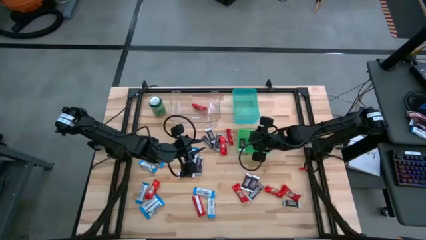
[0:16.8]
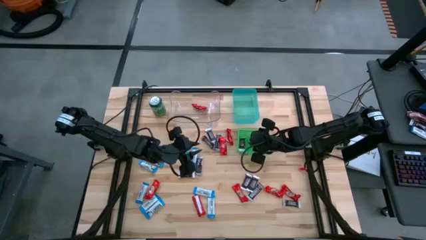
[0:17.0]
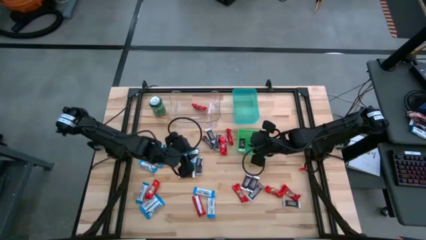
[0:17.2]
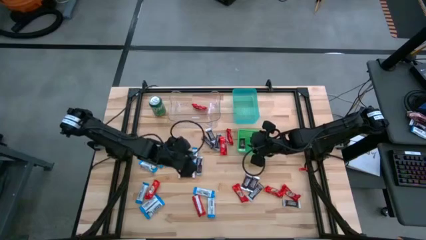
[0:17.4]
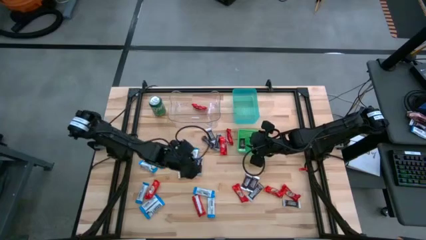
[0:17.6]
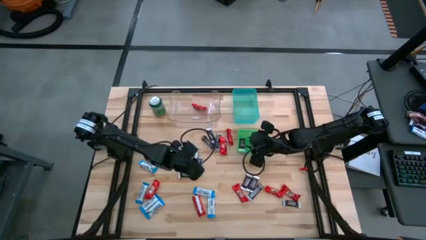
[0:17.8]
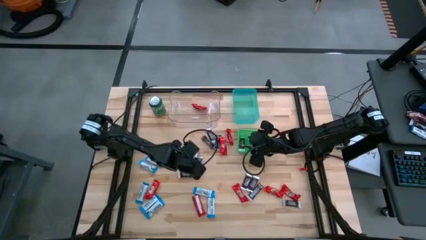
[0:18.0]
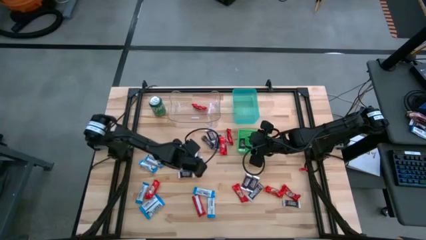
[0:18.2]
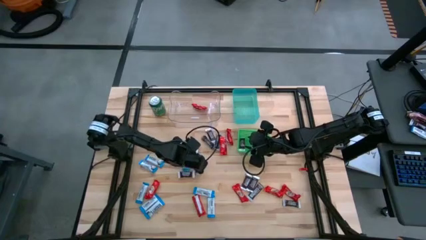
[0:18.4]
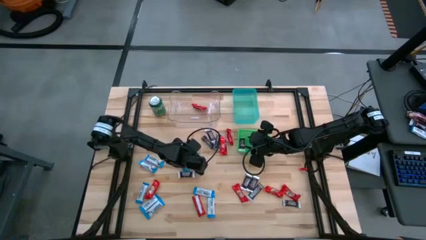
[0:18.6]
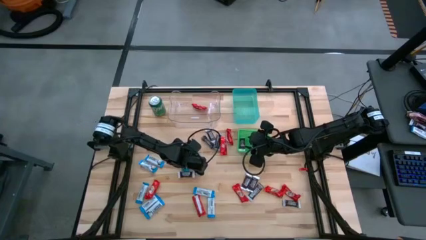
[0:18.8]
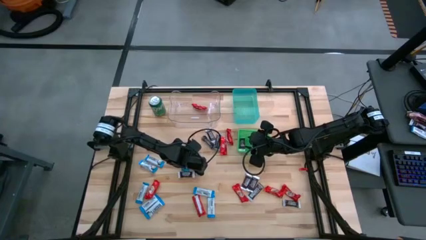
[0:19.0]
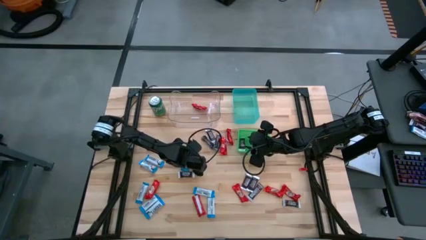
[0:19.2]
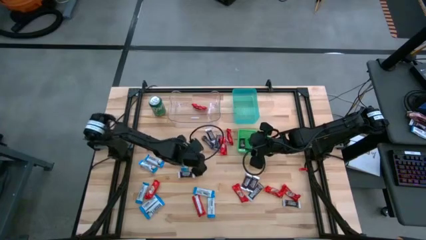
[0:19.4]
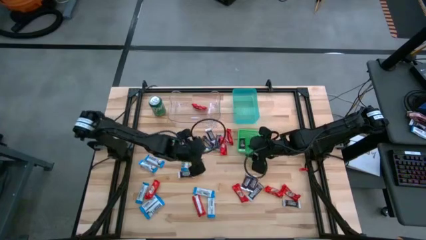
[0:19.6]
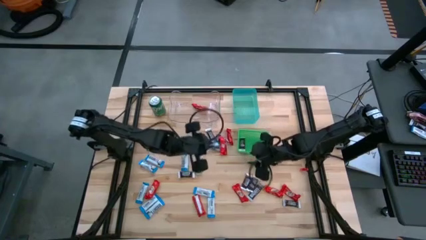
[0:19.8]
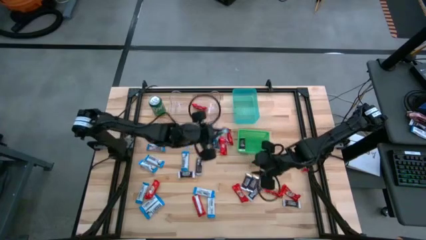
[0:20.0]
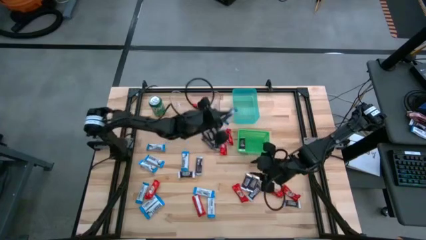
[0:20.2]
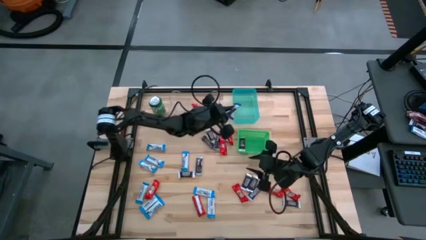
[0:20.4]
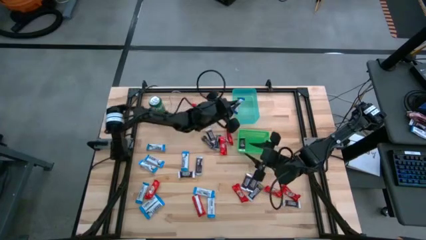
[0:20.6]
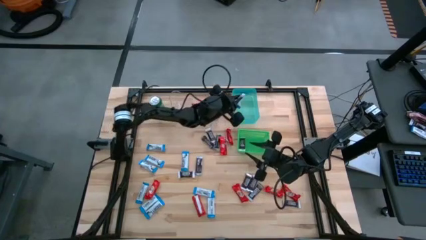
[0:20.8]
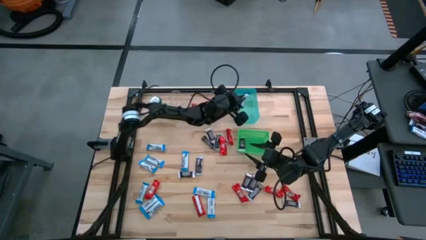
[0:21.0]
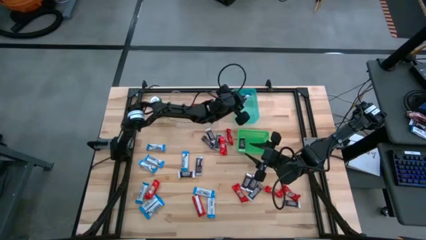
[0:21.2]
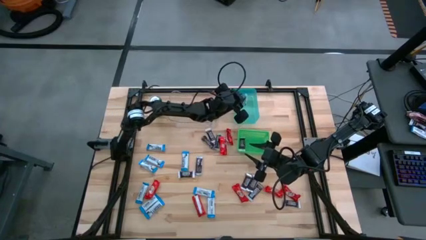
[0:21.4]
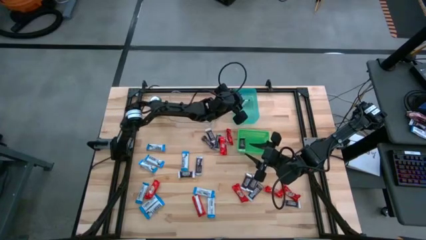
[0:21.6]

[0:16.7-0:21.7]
Task: Sort candy
Put the white chocolate bar into the blue bin

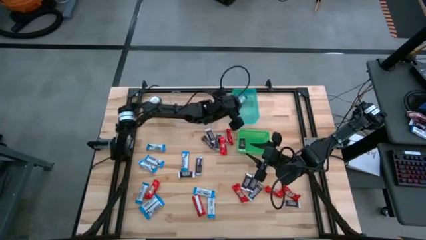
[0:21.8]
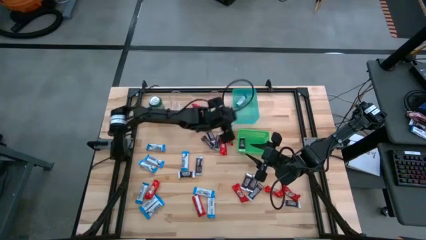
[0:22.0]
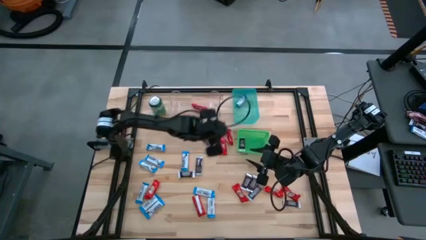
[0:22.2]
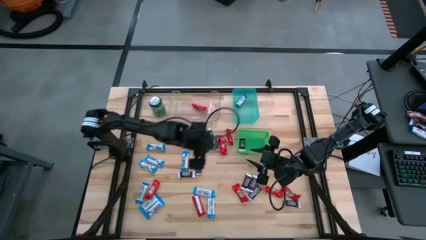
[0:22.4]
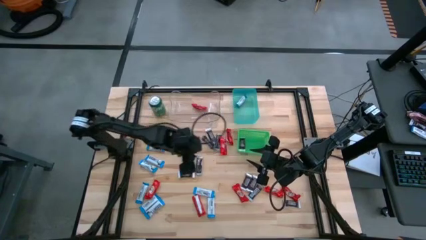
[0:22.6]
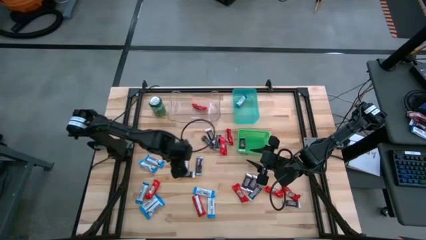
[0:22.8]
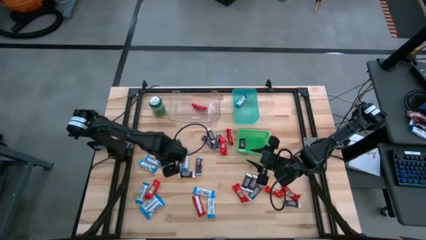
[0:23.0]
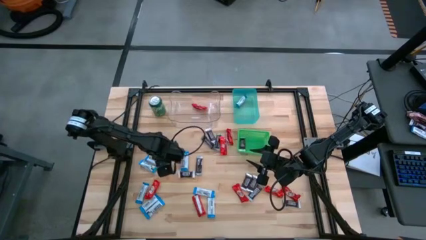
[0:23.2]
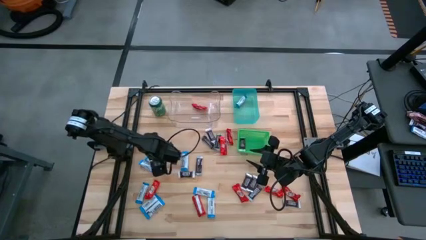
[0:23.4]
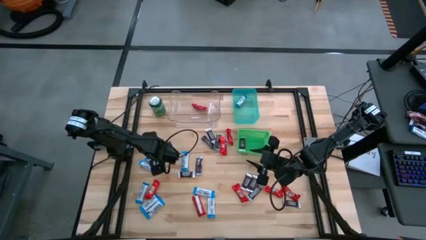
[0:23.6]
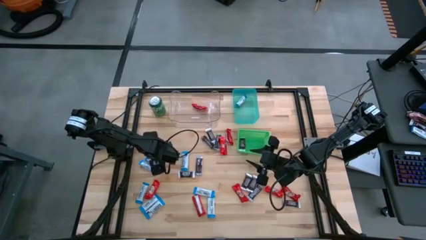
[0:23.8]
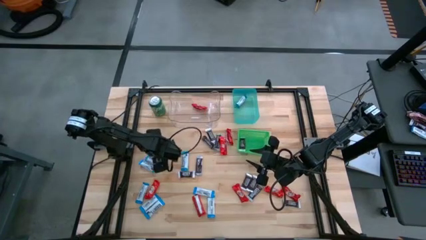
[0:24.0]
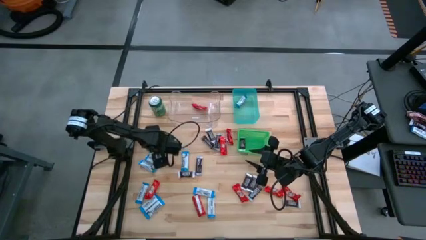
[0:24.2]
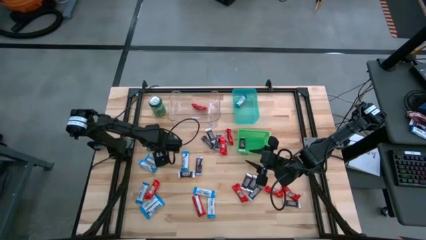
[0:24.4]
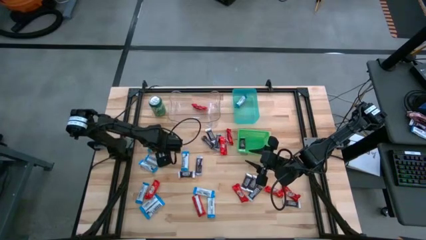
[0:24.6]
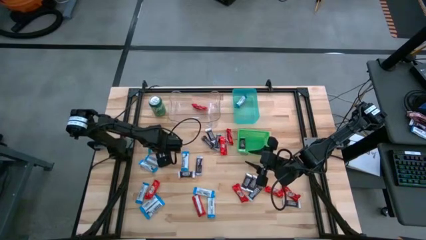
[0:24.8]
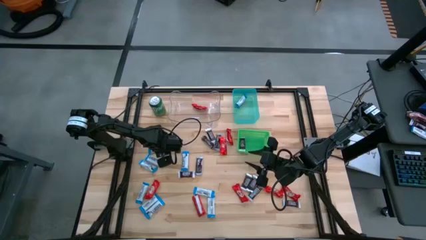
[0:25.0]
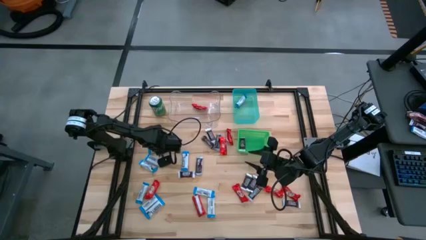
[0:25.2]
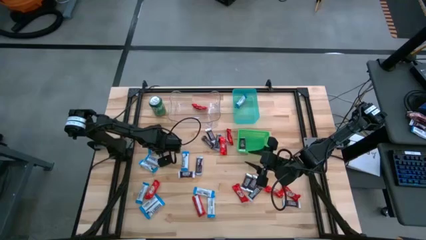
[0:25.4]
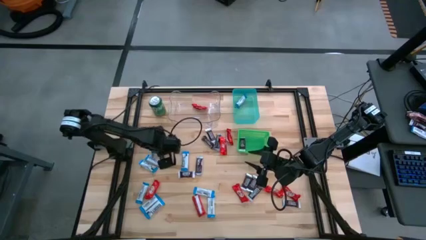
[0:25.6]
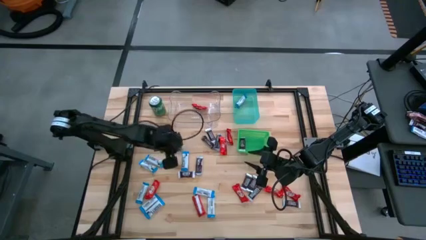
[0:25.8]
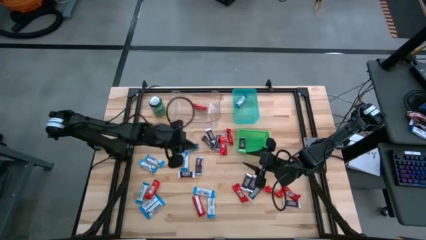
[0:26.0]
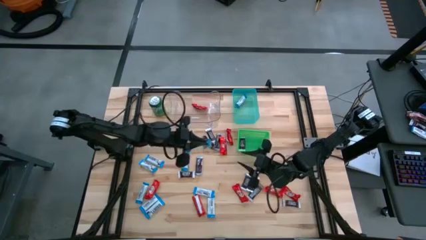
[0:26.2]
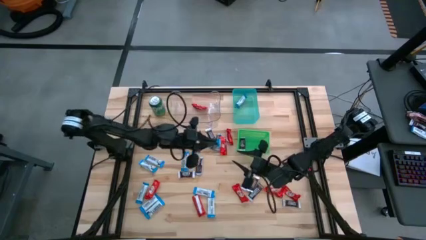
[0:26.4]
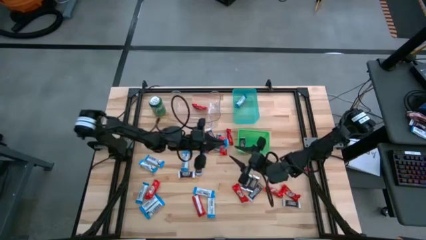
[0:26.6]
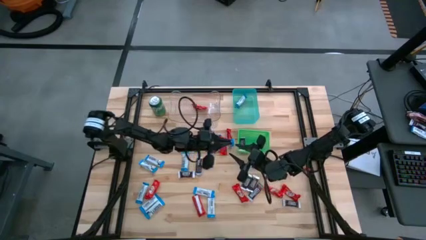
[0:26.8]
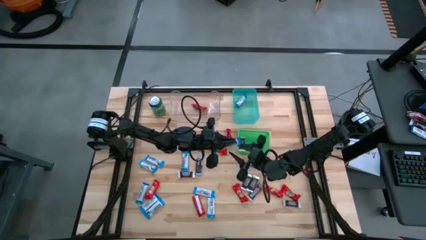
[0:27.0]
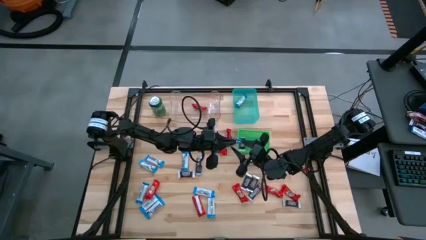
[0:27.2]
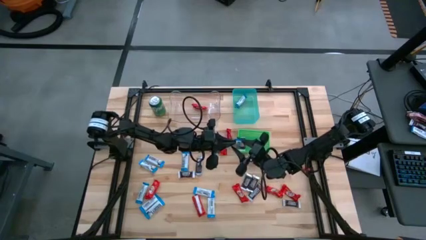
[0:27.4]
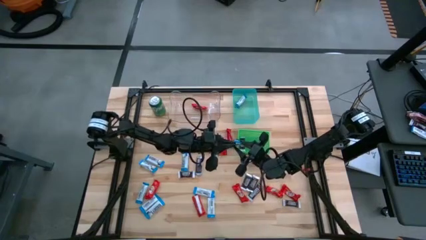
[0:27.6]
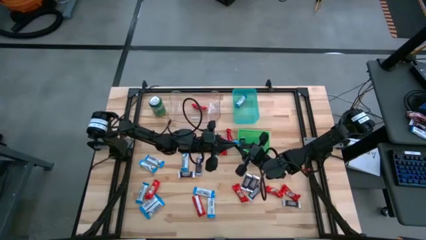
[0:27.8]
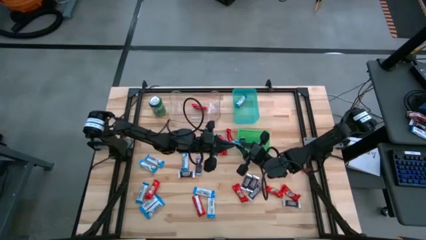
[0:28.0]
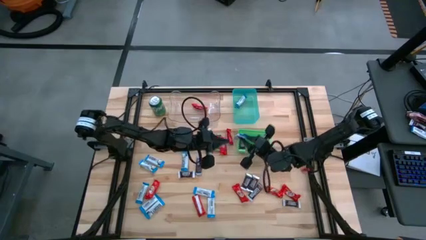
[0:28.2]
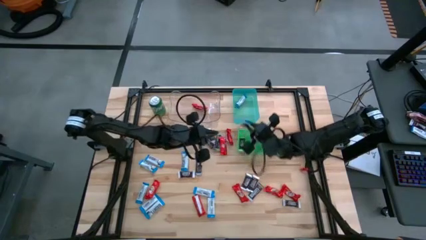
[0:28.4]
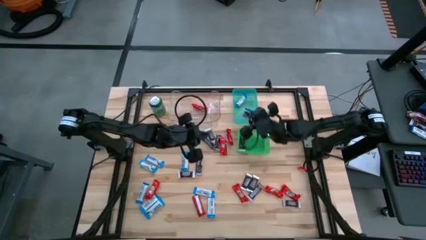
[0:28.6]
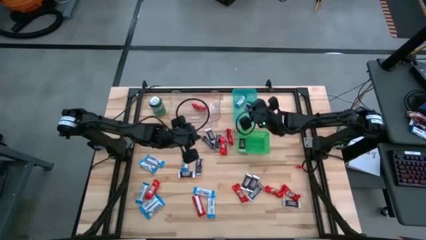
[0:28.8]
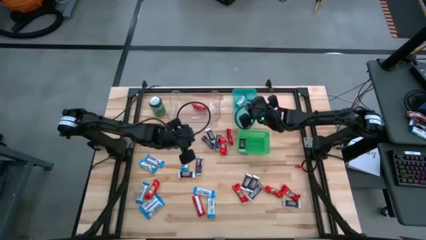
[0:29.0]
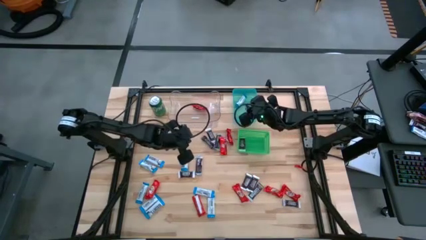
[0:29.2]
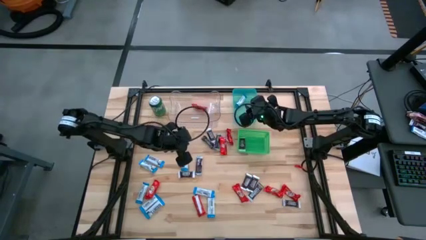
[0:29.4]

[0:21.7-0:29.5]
Put the white chocolate bar into the blue bin

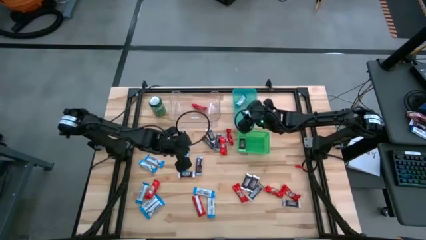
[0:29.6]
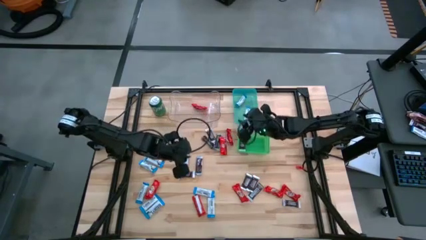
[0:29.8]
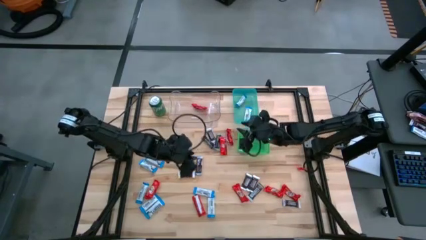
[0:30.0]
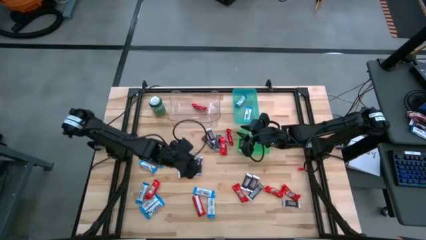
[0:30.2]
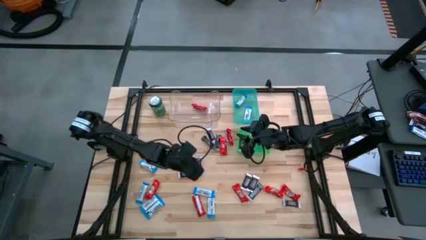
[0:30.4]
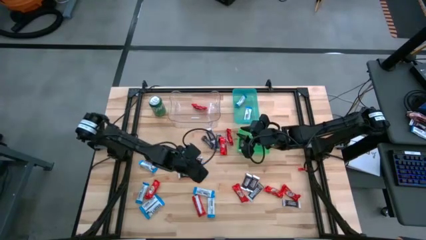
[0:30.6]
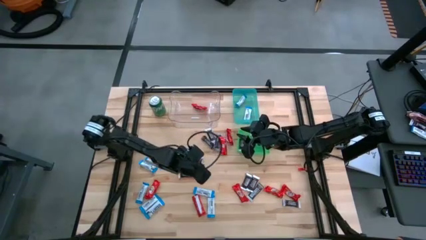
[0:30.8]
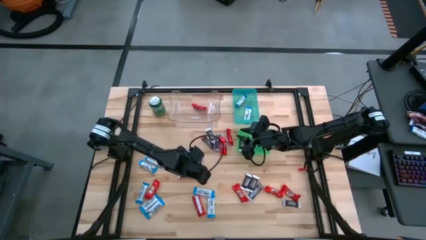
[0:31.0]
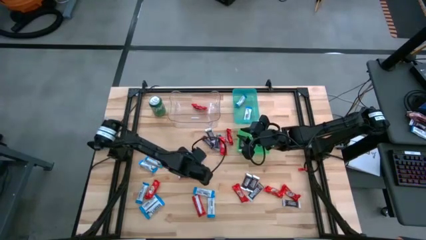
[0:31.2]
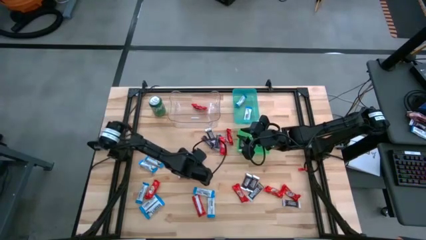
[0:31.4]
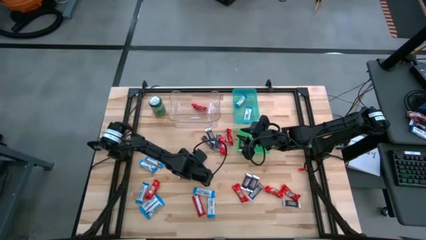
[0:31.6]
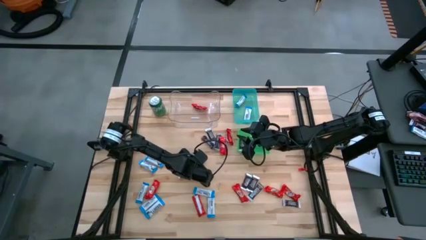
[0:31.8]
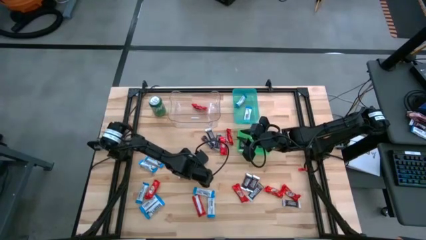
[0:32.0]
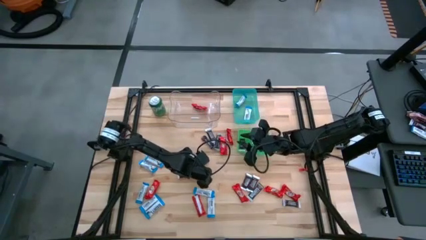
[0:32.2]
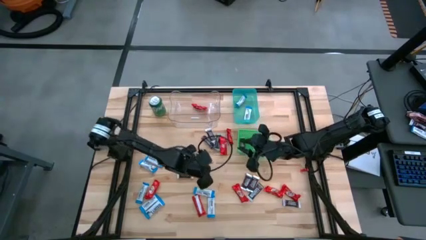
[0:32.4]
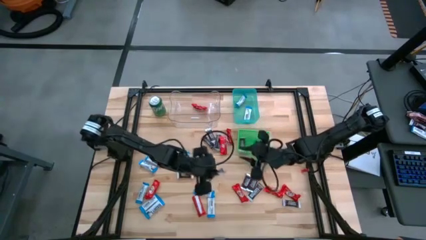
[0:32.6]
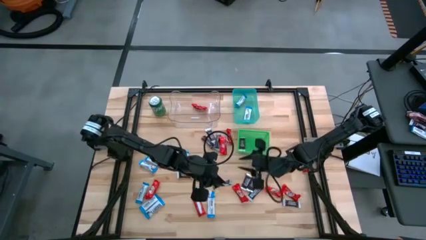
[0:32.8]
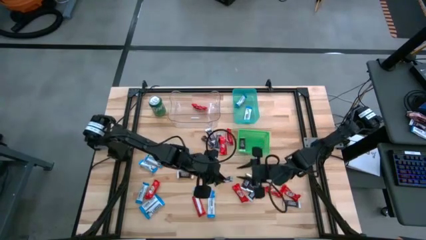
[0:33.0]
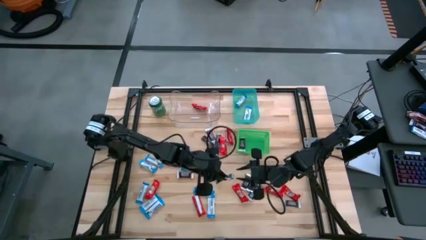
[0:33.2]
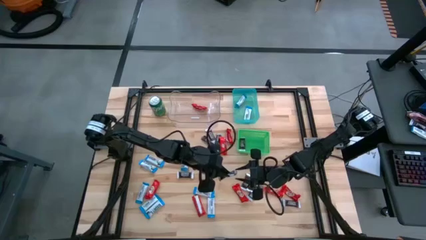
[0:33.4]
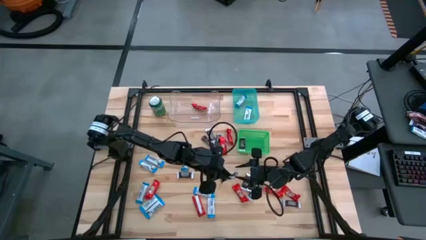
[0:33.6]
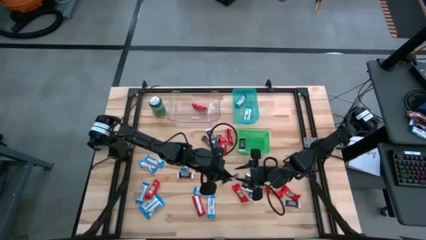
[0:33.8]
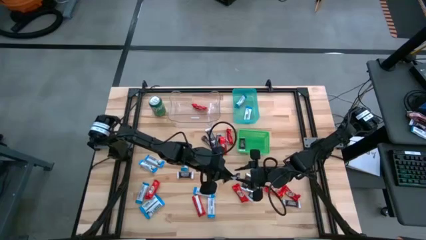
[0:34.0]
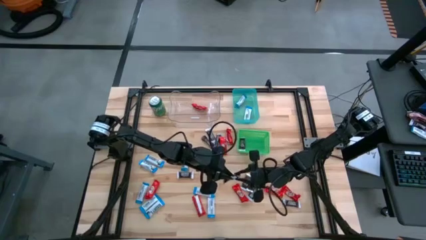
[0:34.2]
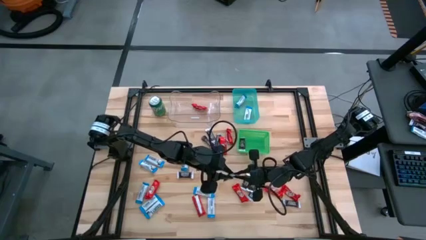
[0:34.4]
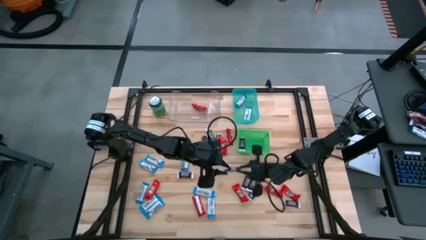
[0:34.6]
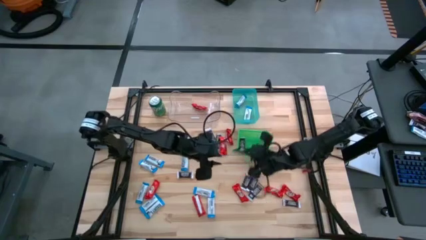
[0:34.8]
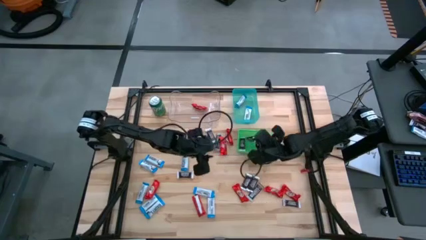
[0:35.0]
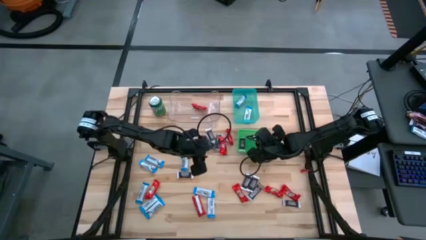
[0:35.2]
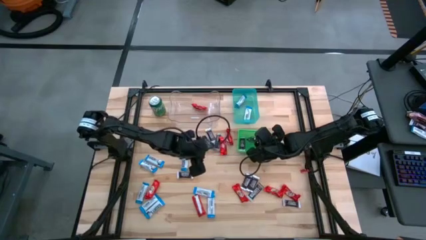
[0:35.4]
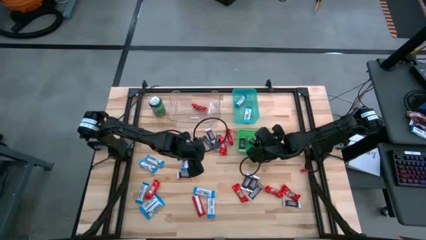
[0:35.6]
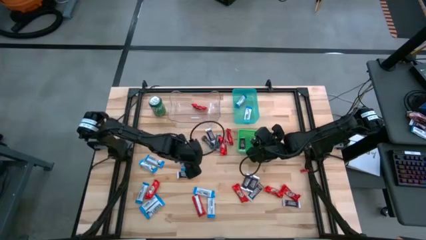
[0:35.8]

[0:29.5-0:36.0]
Put the brown chocolate bar into the green bin
